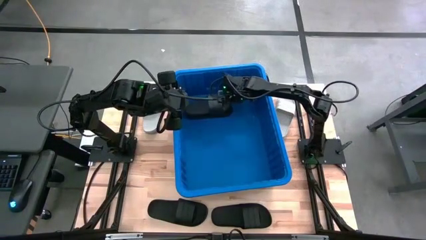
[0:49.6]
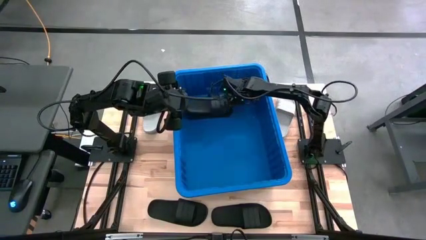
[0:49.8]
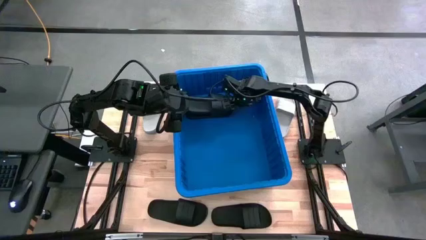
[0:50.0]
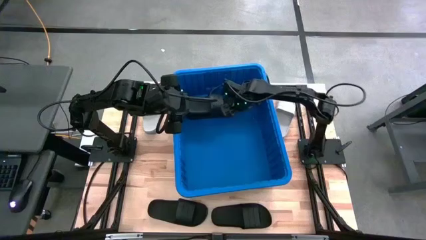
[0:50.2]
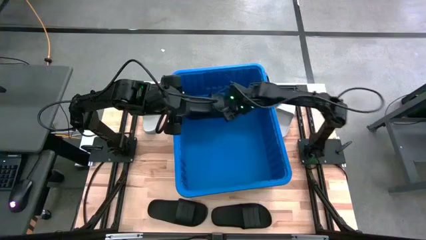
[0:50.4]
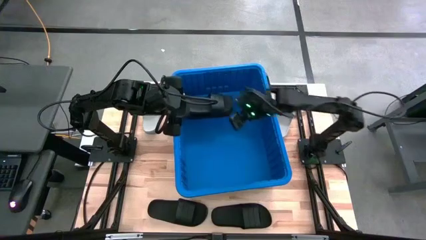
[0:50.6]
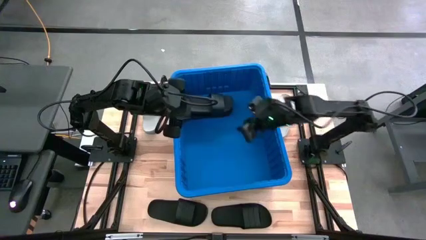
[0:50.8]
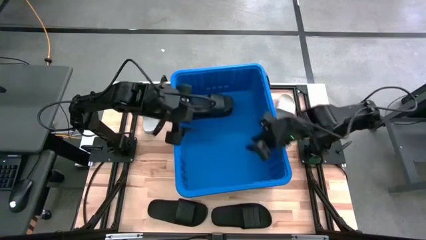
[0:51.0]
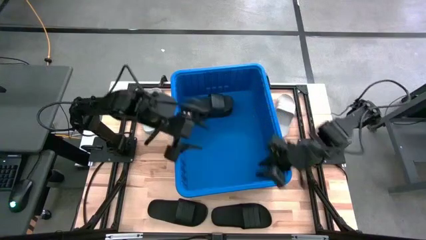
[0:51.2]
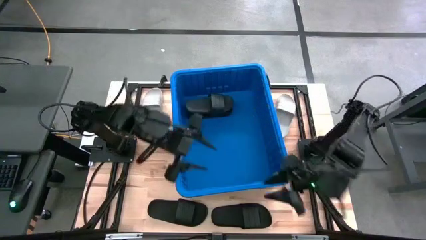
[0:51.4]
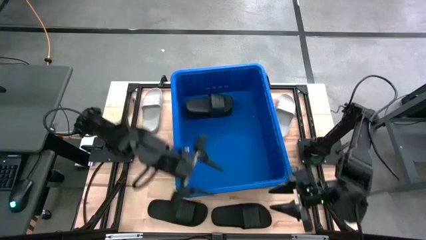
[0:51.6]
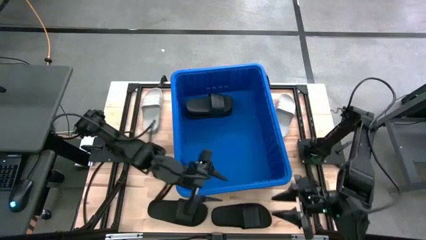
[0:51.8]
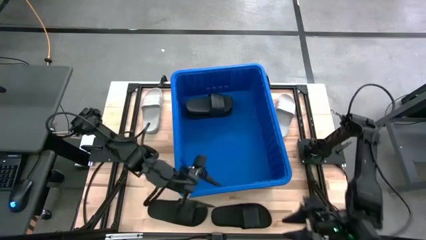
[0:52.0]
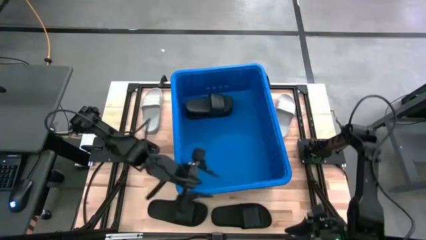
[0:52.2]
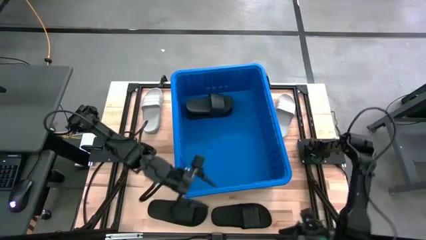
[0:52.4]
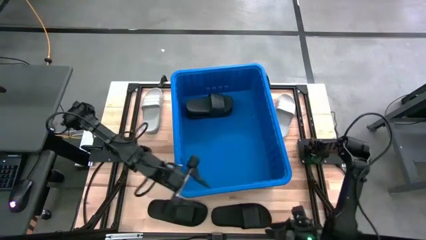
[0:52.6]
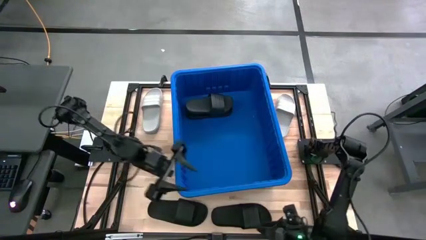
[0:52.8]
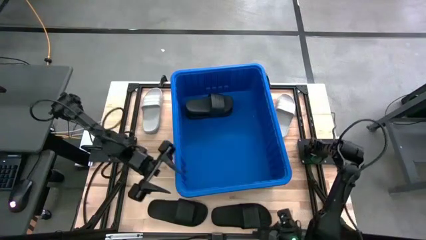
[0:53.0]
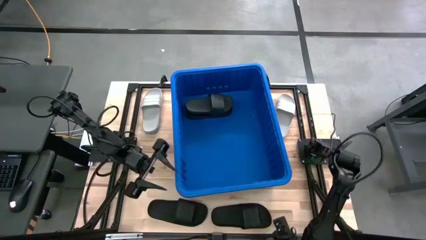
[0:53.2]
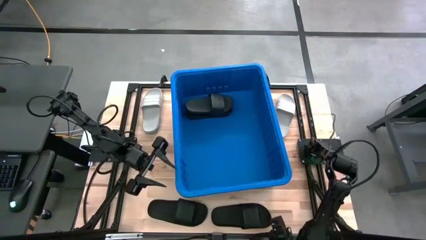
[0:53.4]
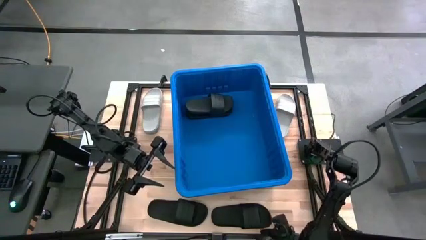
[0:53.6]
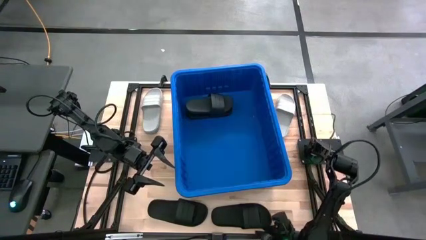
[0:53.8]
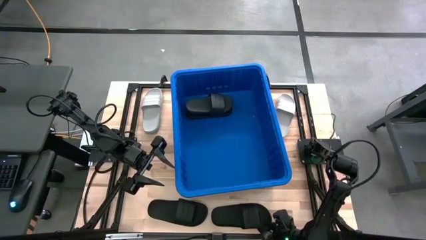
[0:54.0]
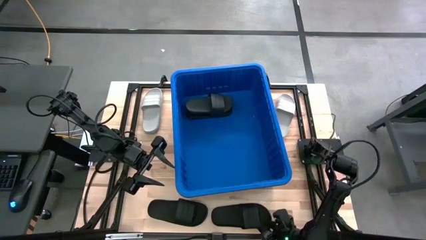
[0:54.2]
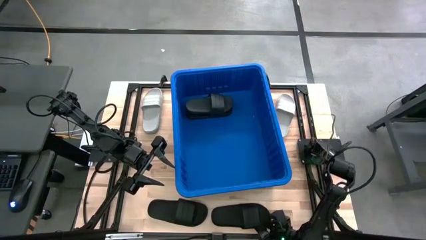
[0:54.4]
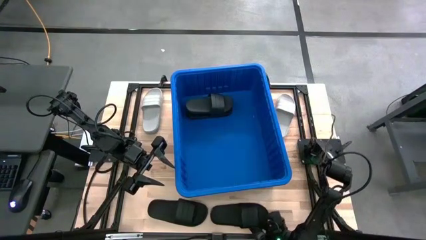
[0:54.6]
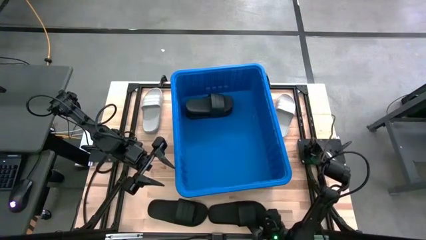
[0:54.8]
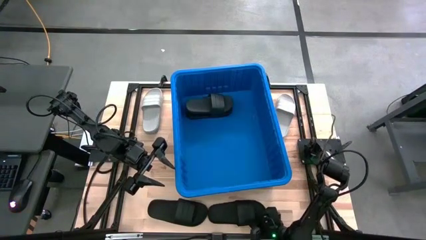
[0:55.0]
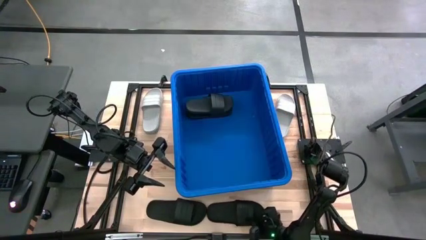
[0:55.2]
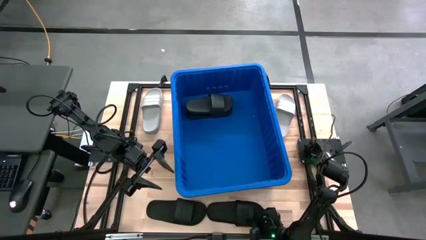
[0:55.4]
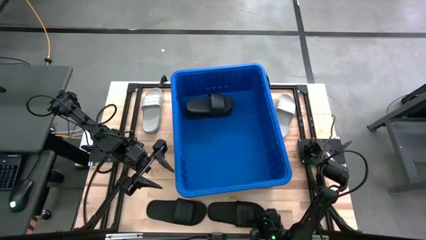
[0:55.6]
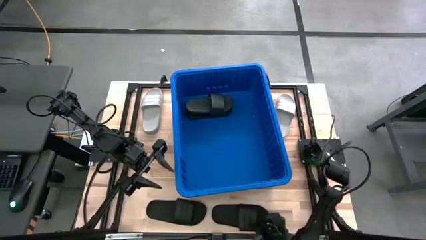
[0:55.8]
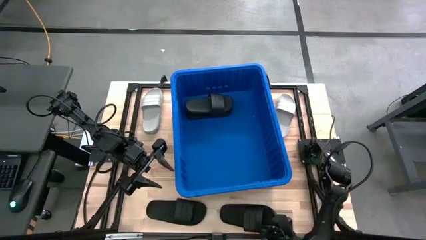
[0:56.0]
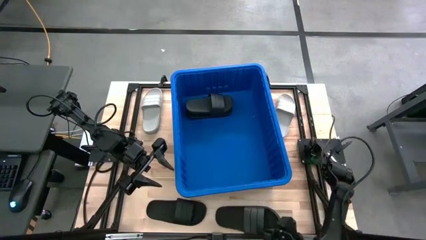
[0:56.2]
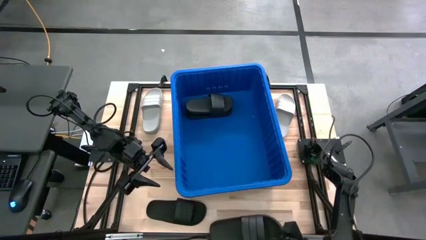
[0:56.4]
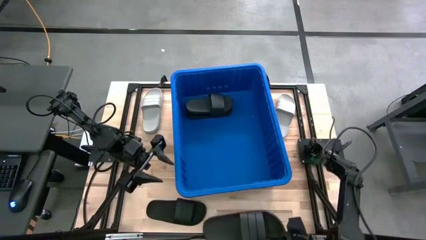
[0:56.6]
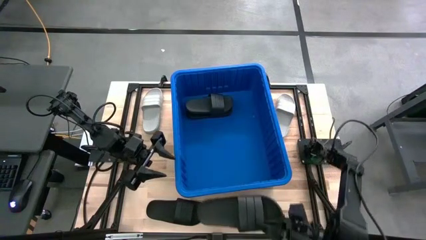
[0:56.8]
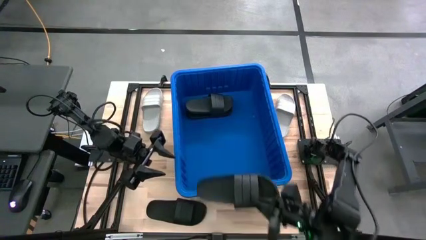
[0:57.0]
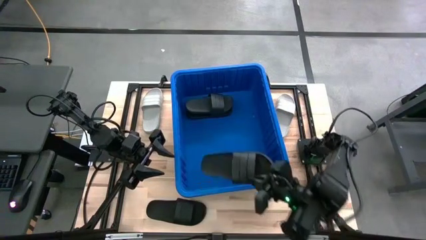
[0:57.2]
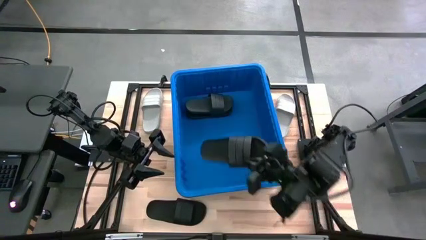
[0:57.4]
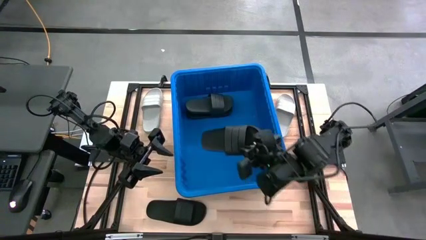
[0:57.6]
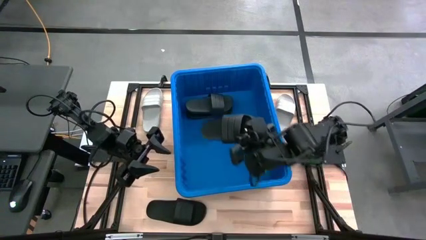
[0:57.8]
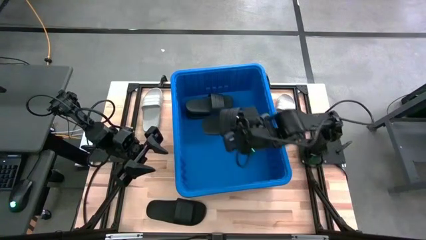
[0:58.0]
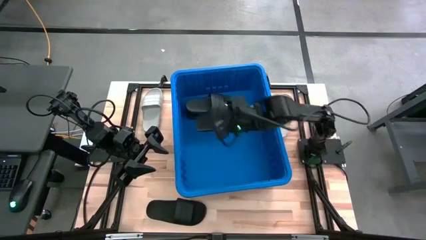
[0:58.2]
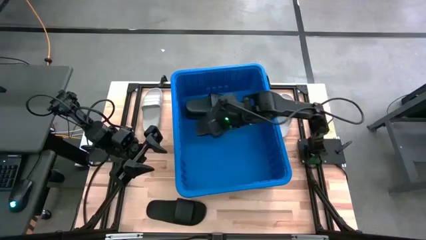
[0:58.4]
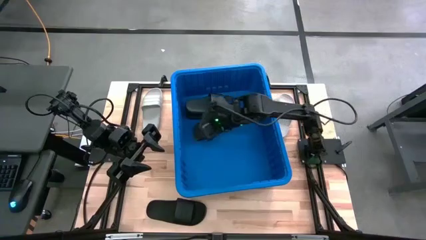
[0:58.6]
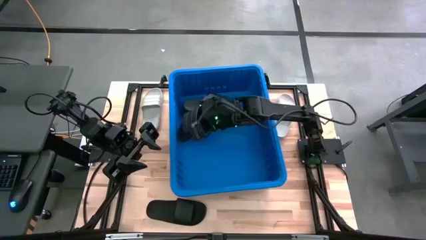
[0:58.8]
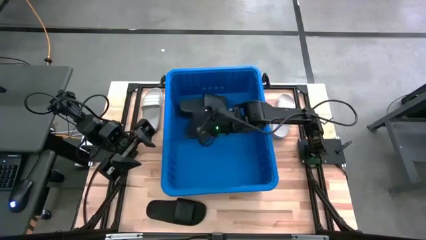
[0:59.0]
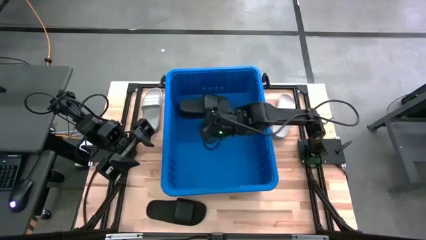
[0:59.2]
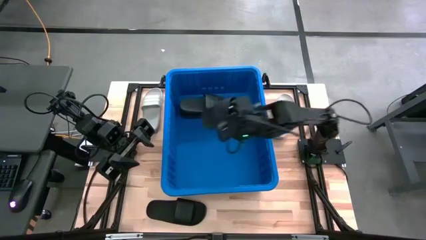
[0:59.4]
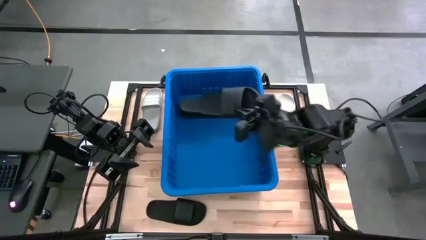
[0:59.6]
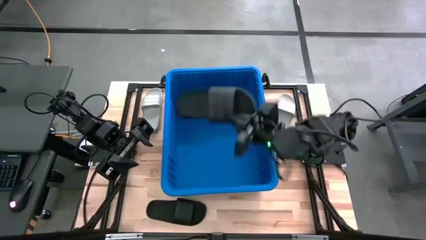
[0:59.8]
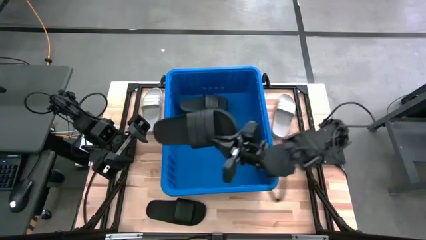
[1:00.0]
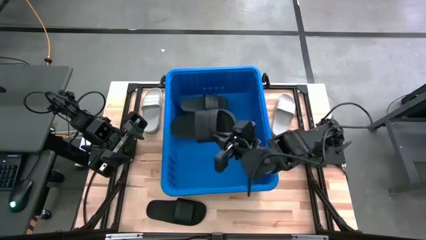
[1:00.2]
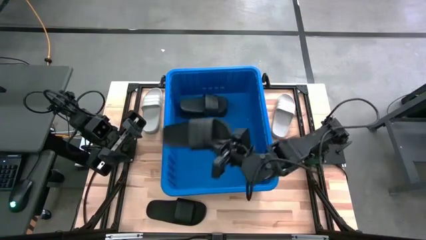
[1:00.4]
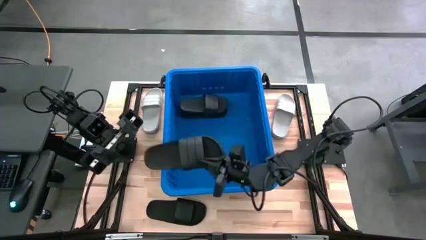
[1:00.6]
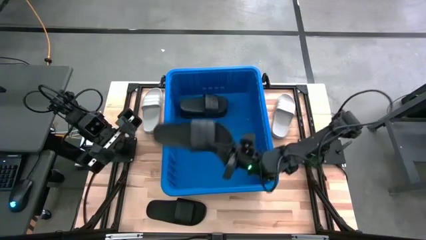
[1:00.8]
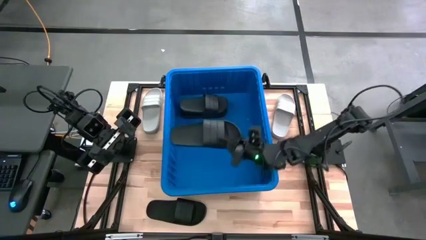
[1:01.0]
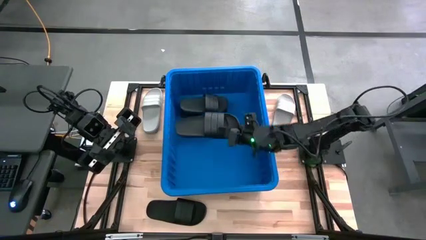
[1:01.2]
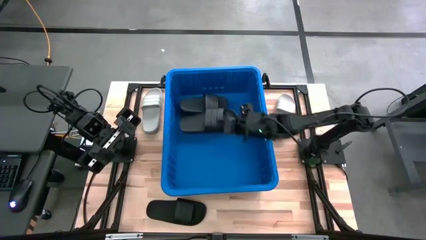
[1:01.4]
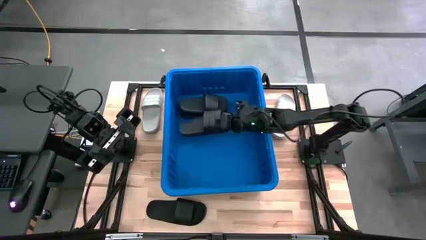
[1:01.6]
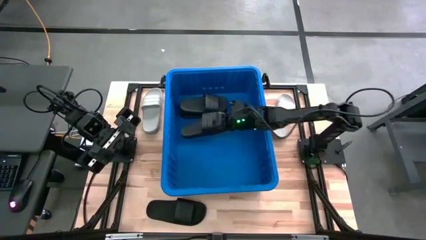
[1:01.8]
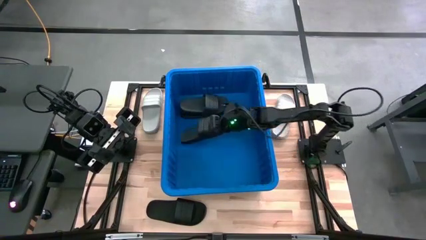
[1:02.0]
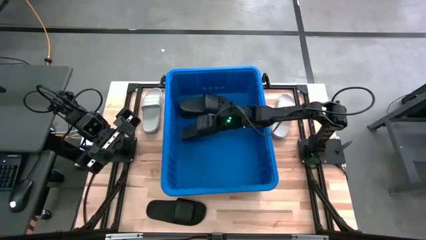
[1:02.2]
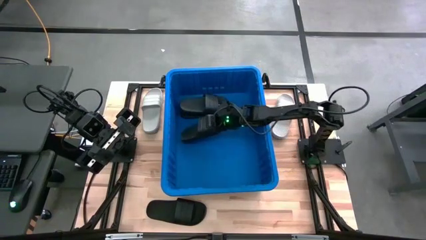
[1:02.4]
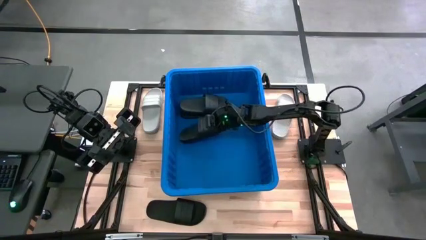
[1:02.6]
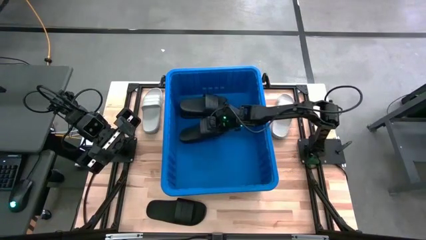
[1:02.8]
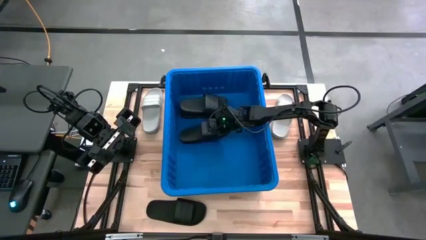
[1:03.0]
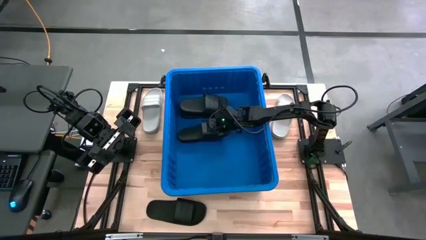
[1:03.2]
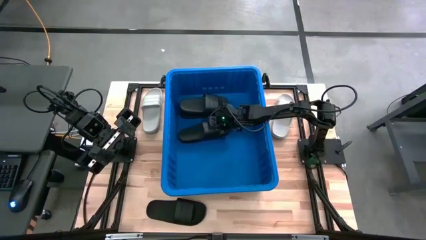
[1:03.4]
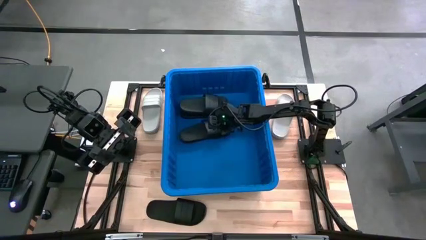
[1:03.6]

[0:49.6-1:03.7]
Task: Pick and place slides into bin
Put the black slipper into the bin

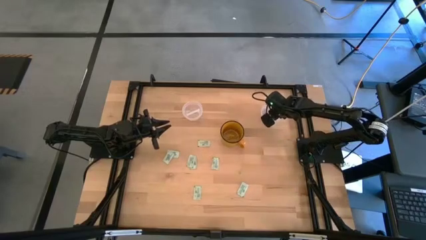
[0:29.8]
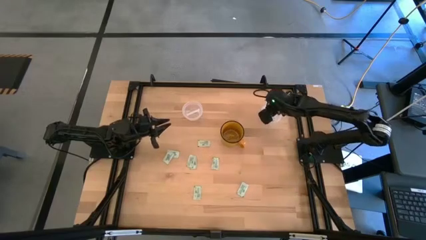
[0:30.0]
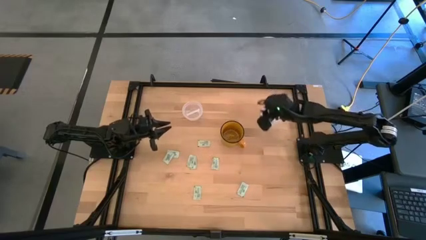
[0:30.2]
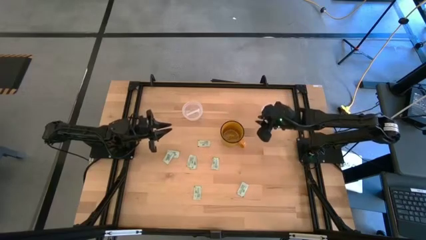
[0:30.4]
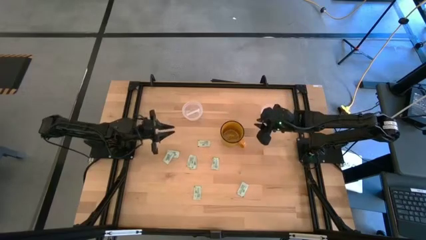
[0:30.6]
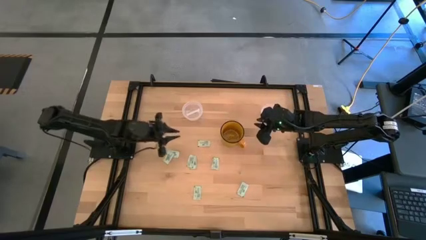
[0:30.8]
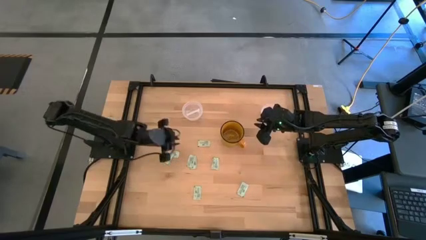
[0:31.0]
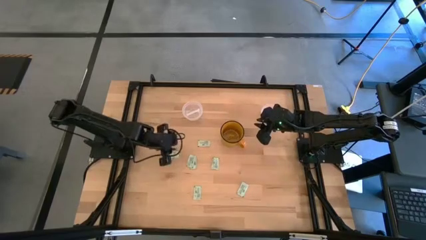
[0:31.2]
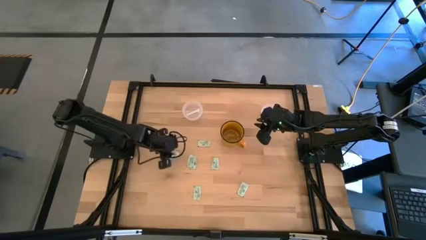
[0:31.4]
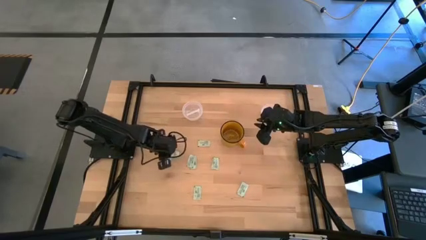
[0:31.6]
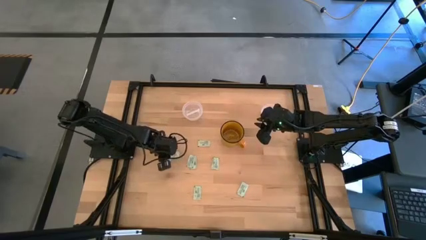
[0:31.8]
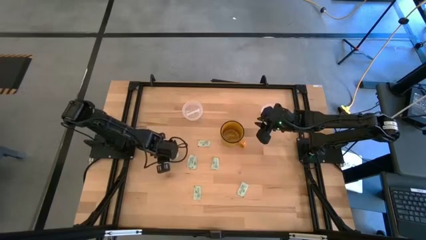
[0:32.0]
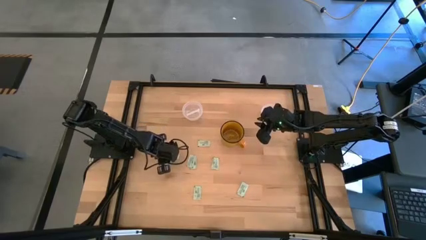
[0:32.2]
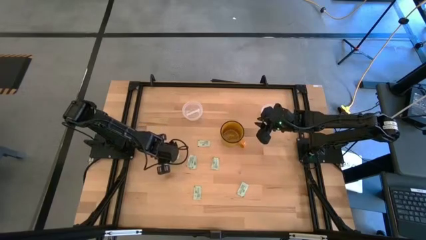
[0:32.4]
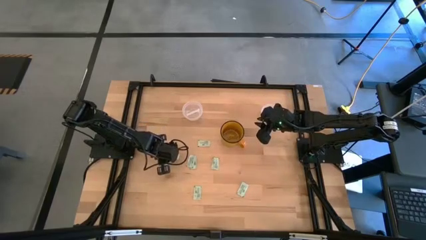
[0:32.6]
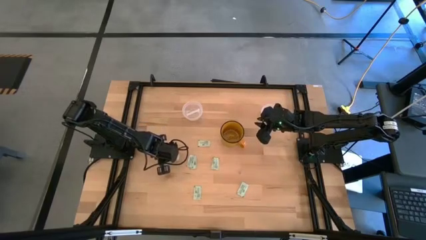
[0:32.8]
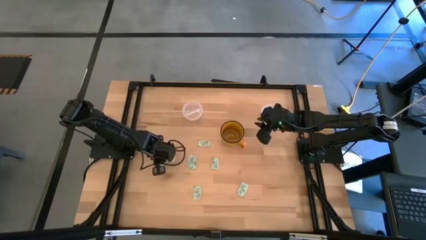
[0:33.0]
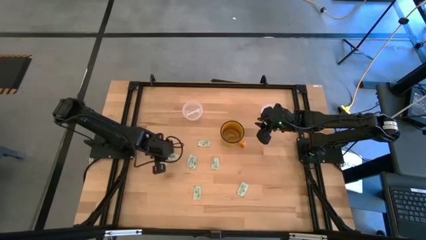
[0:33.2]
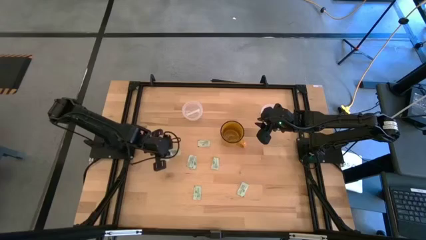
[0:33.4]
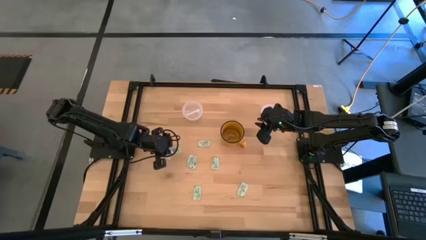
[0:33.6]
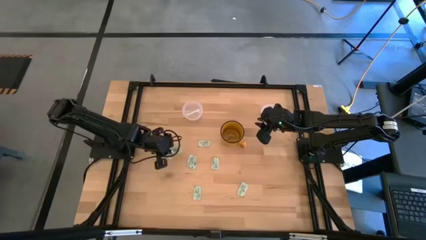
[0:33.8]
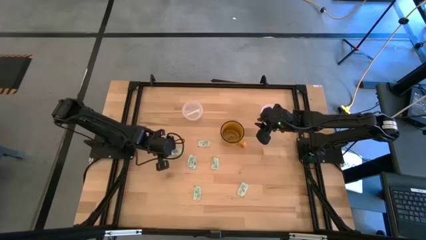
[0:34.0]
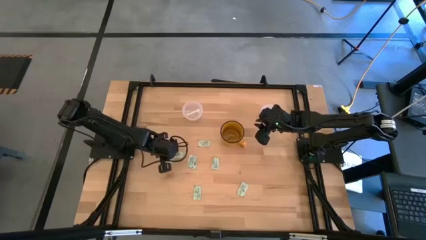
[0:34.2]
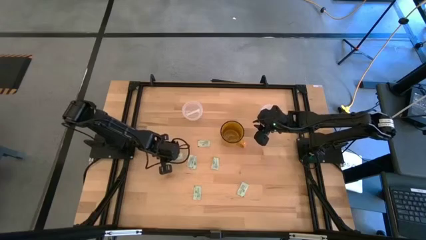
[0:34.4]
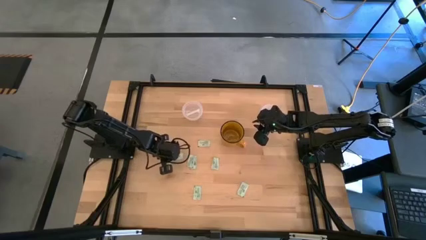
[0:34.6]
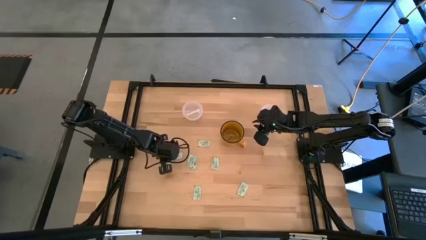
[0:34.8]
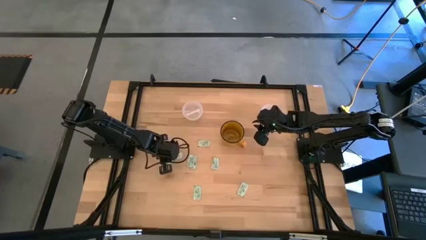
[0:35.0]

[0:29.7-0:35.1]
Task: Pick and place Stevia / Truvia into bins
Put the white stevia packet into the left transparent container
